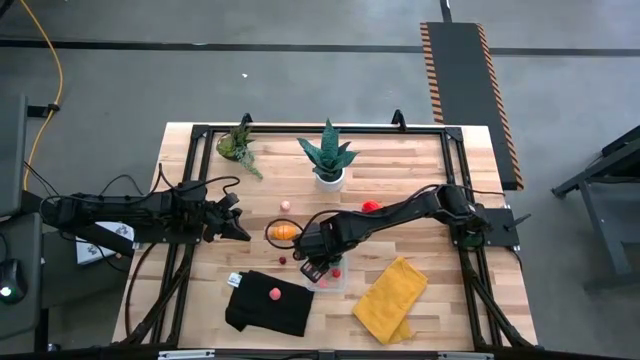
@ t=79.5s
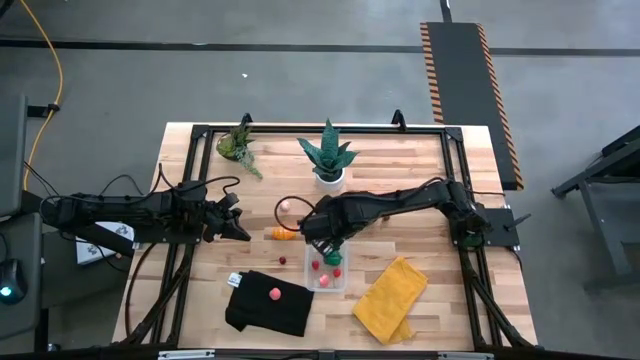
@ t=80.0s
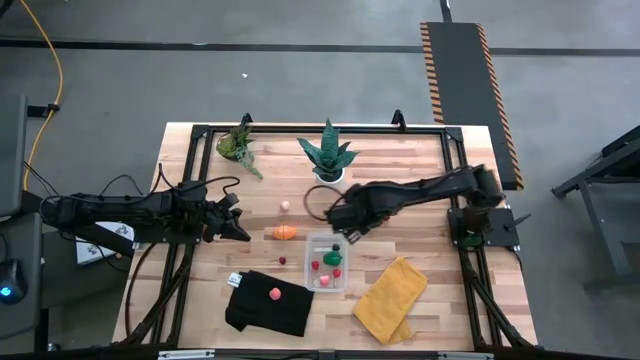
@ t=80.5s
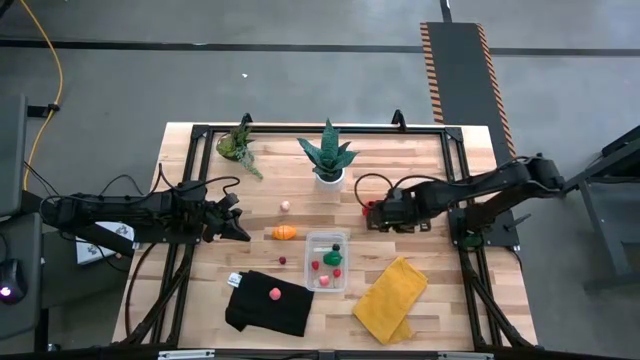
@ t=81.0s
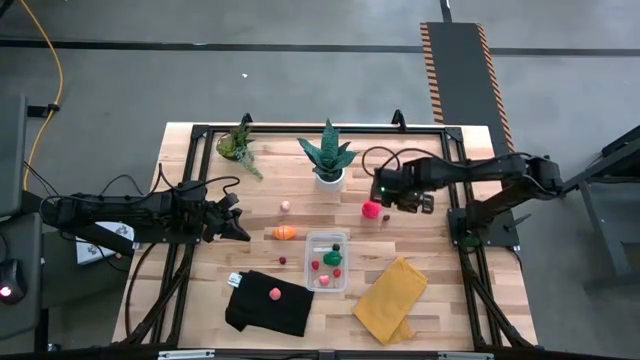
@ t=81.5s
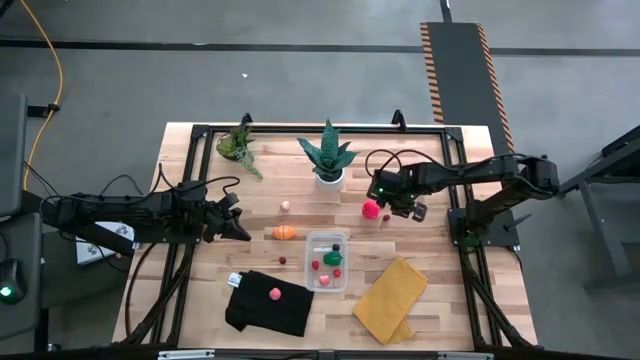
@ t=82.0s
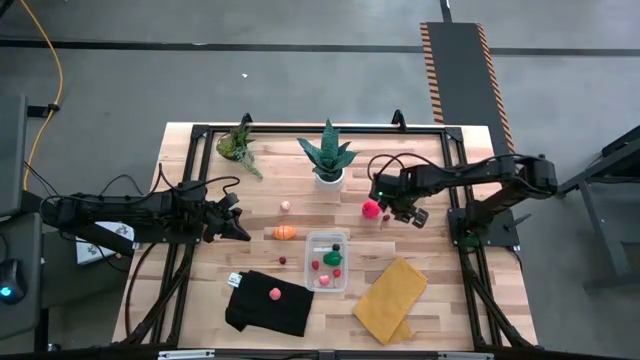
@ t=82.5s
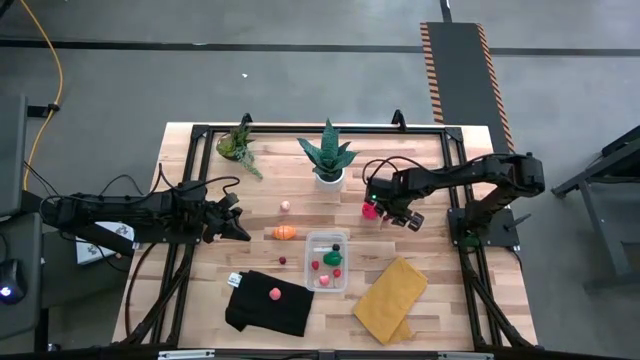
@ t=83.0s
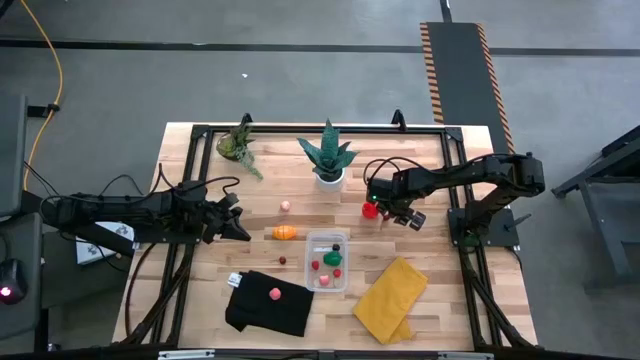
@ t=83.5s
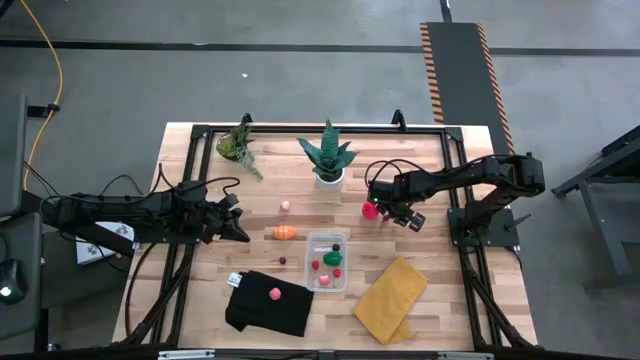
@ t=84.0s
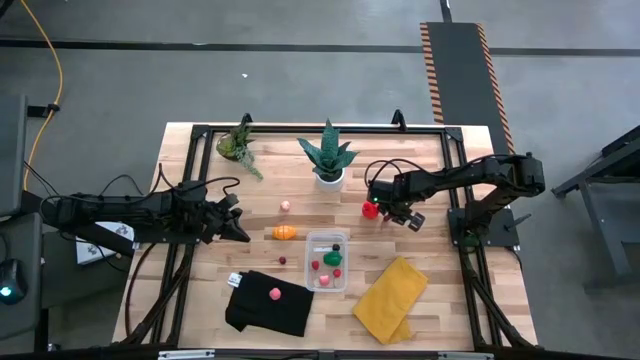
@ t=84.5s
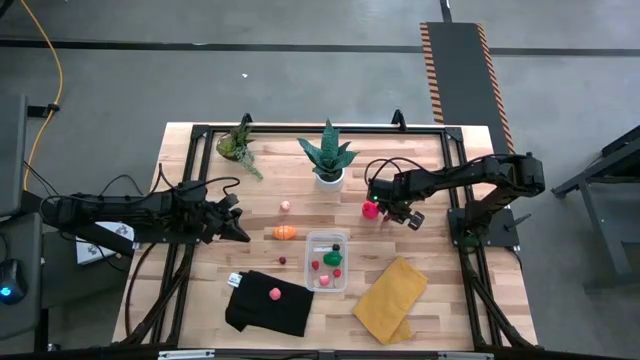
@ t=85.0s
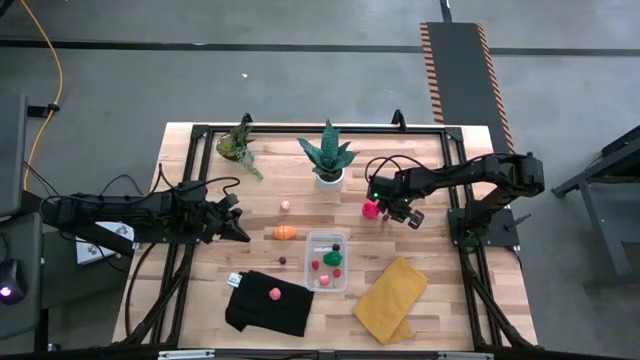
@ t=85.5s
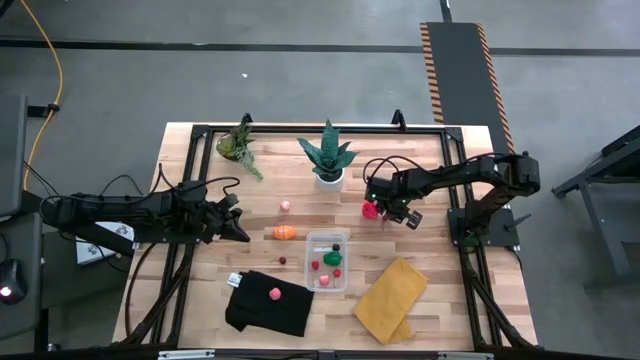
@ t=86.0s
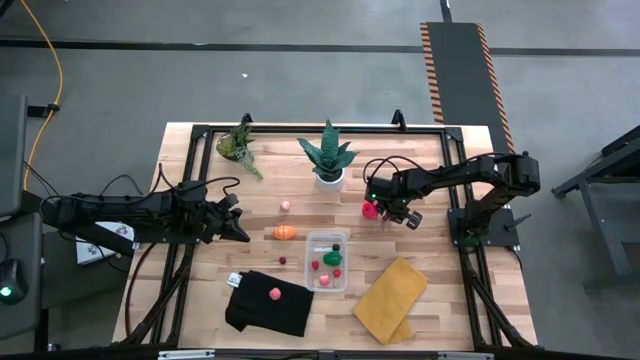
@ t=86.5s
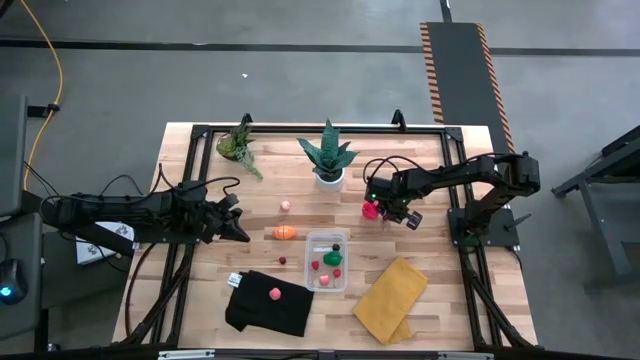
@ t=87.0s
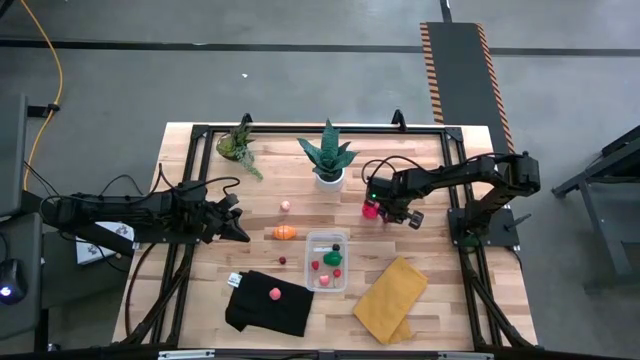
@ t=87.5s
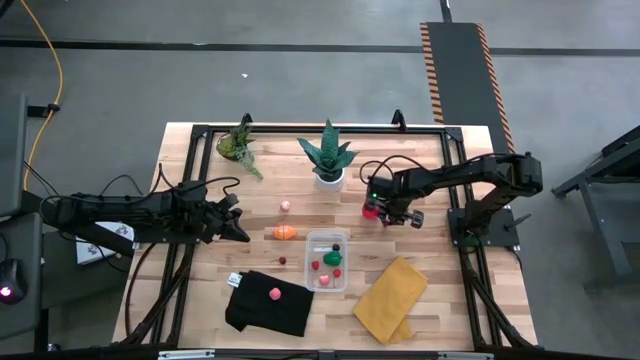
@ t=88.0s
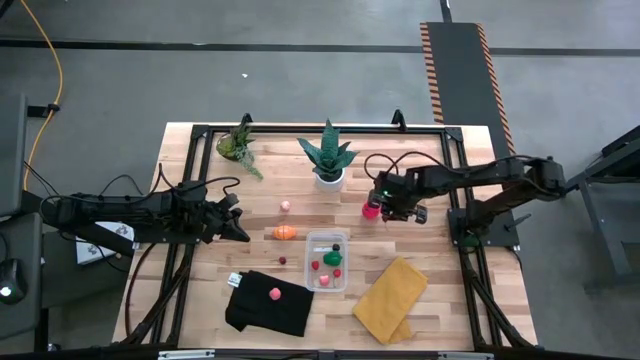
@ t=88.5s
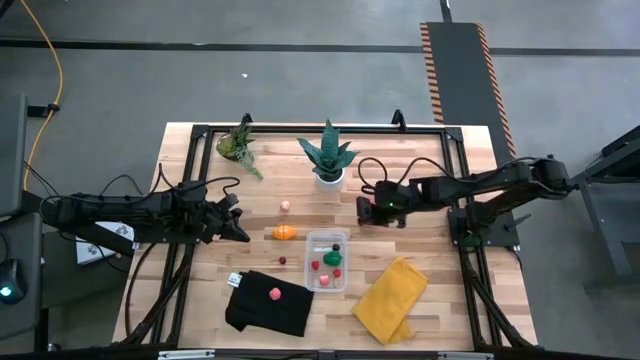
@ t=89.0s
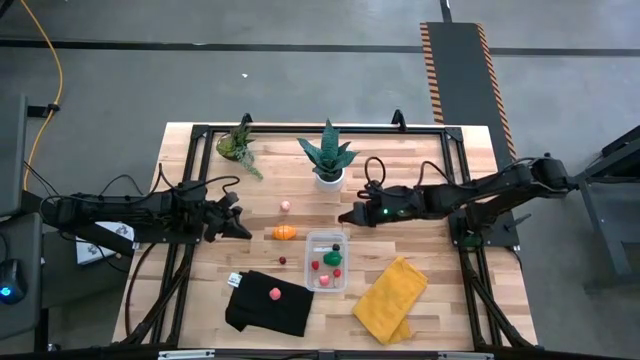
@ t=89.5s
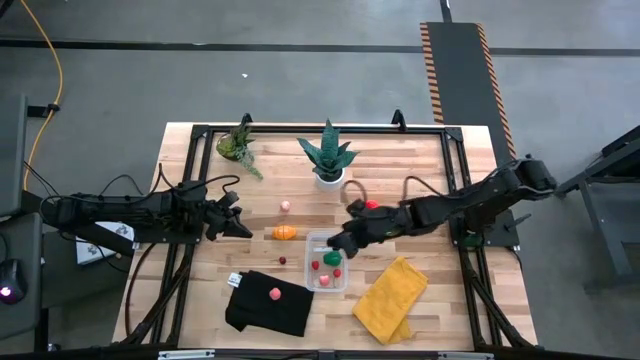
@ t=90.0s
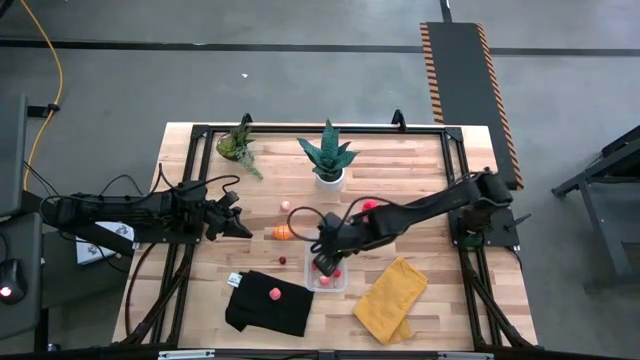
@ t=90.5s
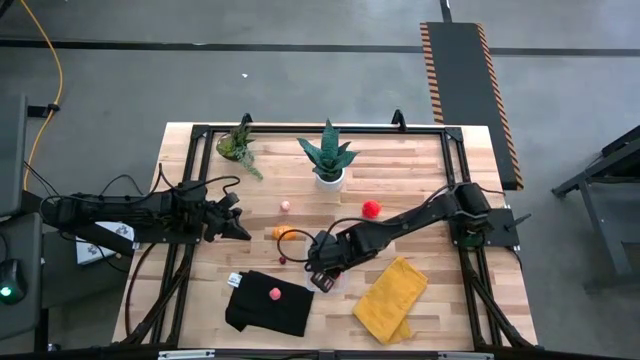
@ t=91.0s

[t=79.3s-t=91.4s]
Task: Pick and placing Produce into tupperware
Put the top cherry into the transparent container

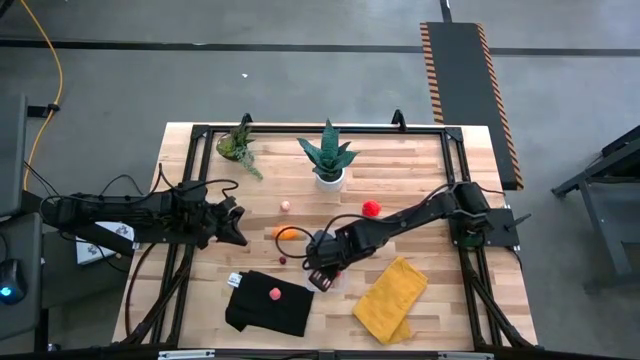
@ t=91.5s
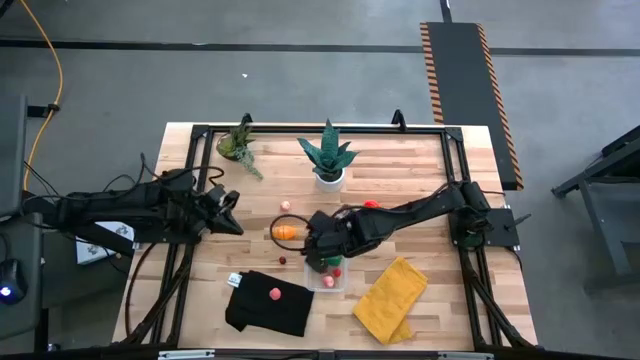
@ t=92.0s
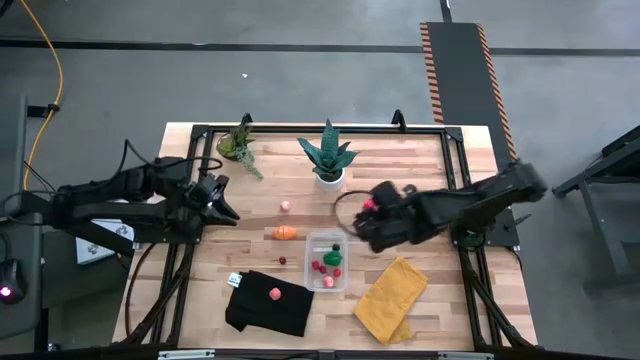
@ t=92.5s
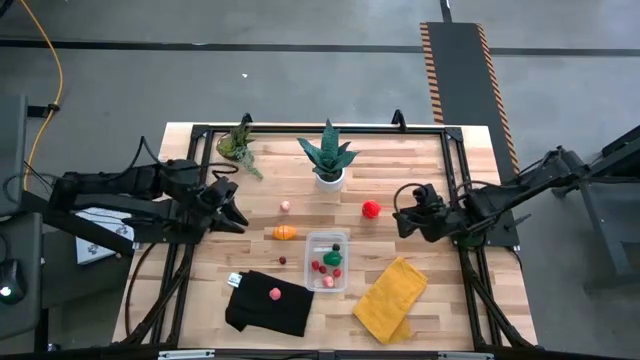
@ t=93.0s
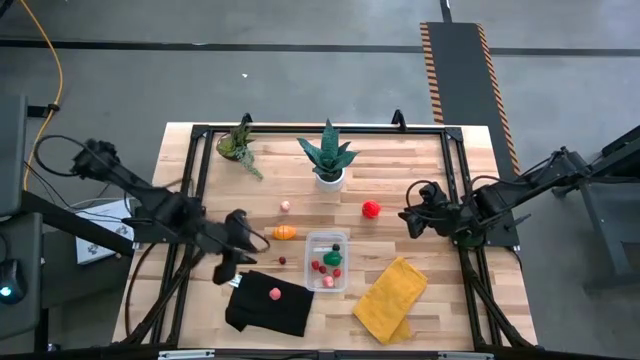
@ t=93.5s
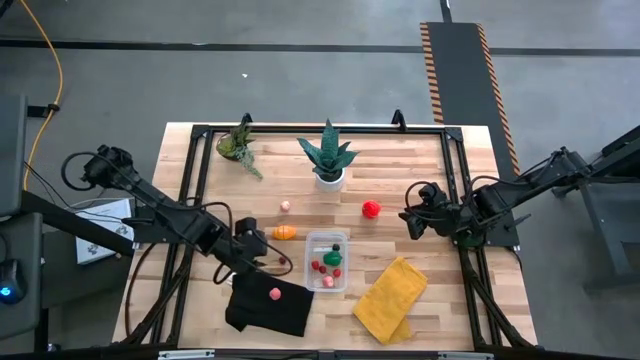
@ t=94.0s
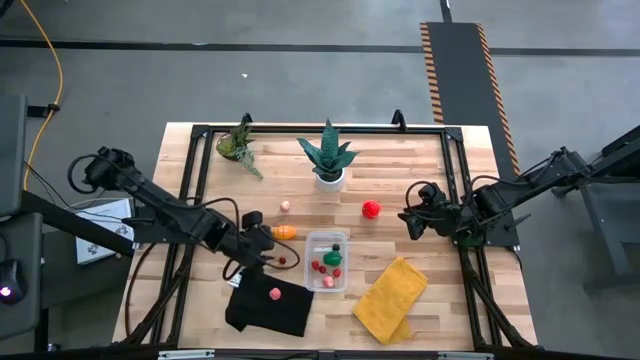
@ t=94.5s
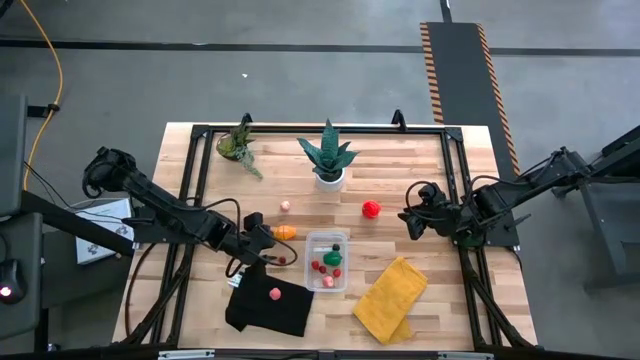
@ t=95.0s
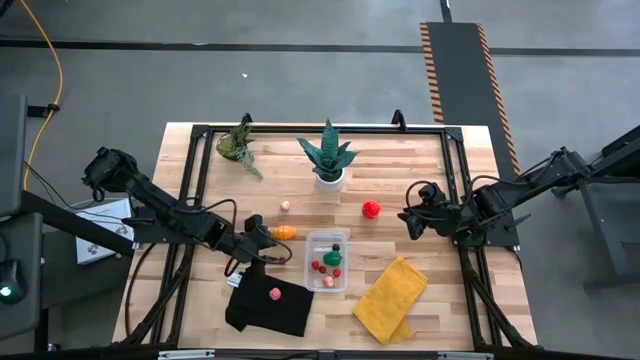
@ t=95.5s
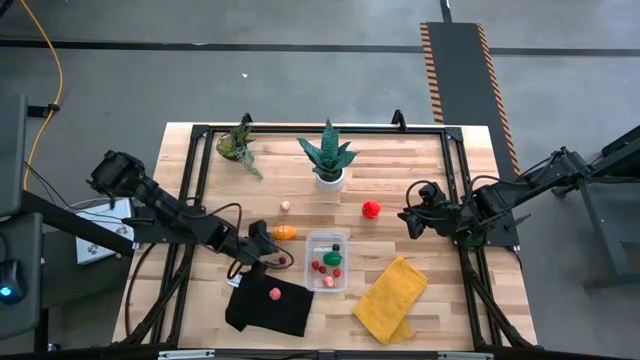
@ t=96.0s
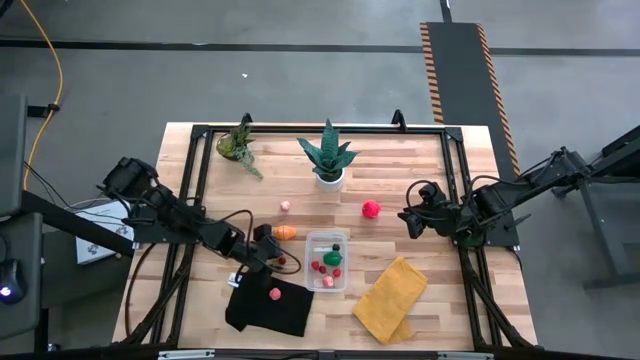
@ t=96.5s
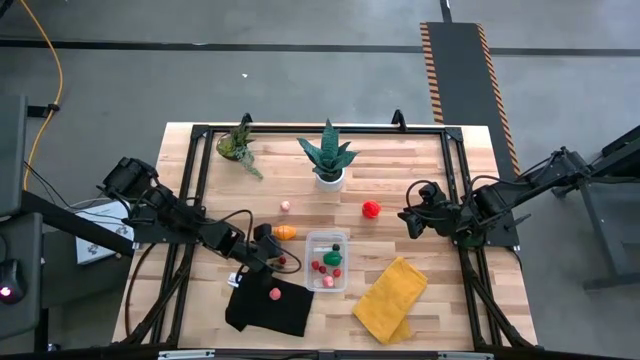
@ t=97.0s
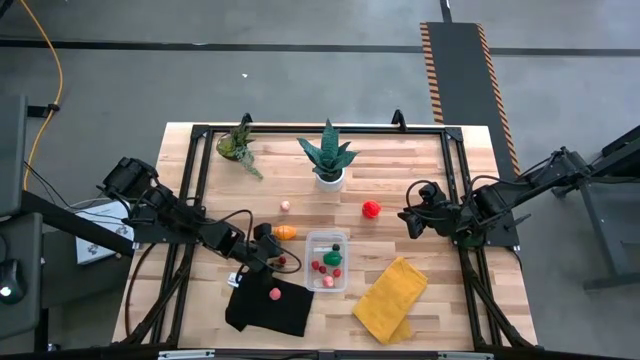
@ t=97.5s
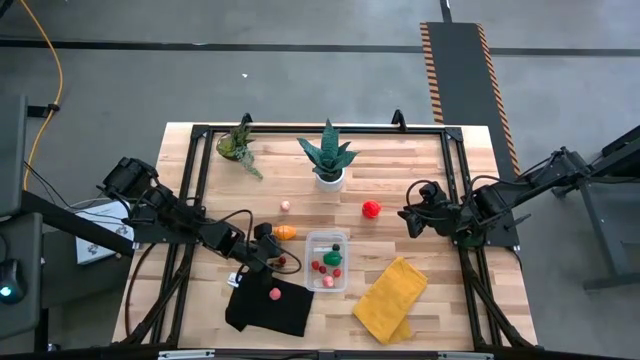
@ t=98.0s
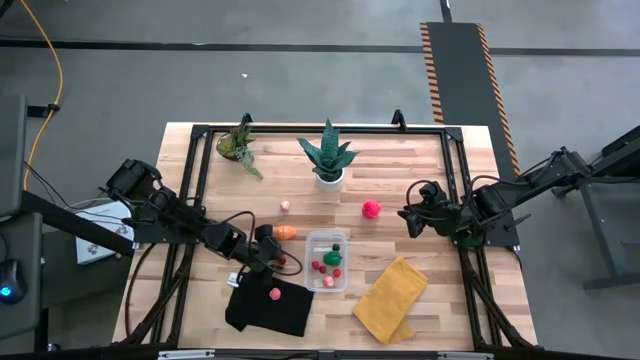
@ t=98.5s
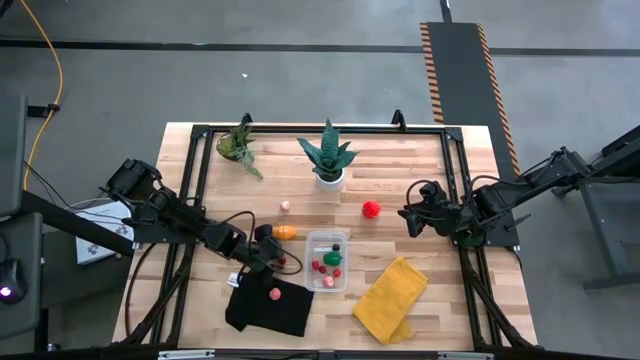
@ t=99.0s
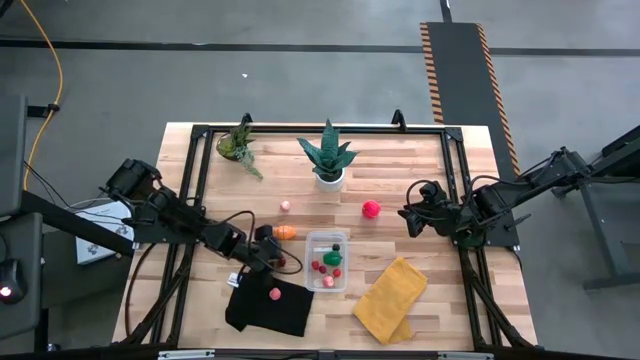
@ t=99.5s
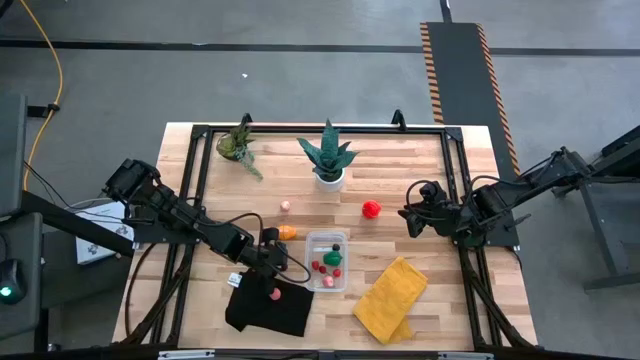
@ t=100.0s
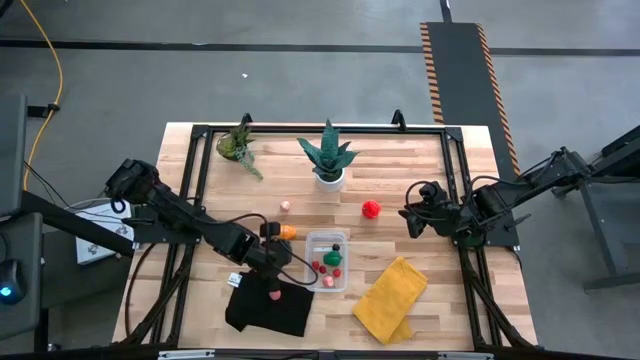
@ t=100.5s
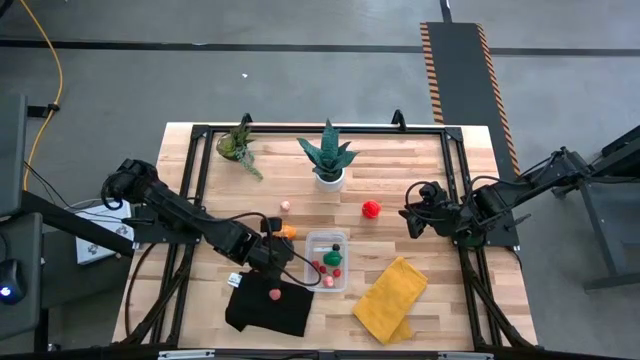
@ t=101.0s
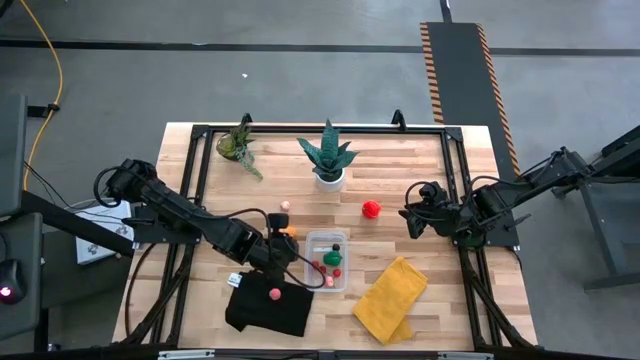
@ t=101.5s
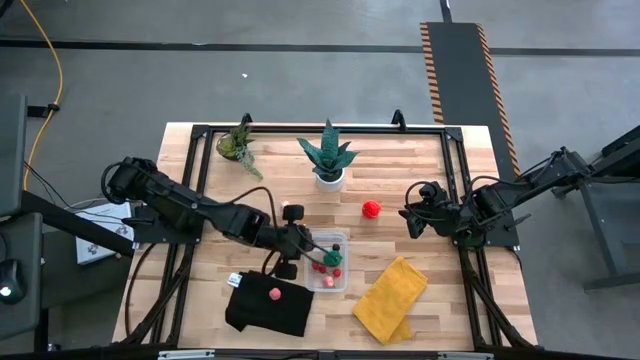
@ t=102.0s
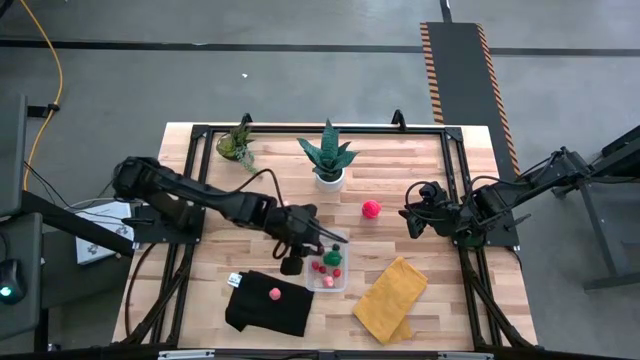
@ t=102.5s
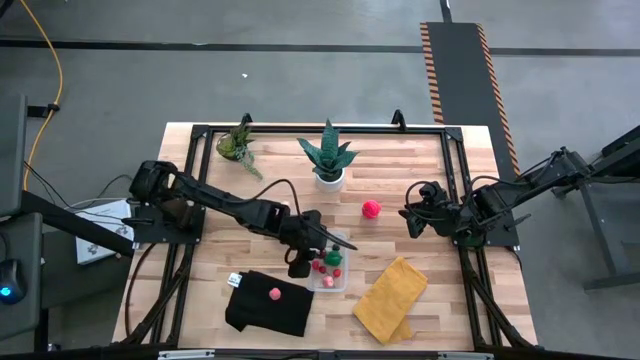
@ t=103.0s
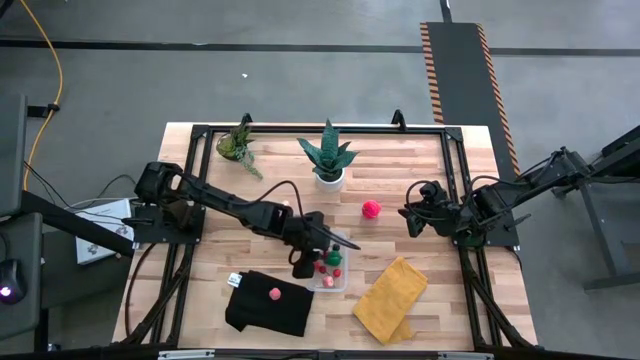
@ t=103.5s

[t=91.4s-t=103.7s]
Put the cherry into the transparent container
